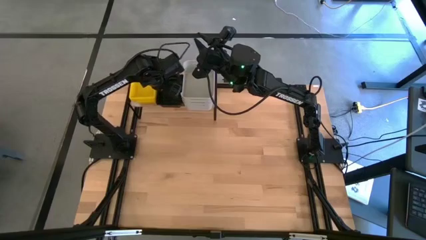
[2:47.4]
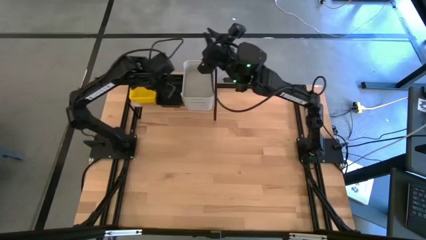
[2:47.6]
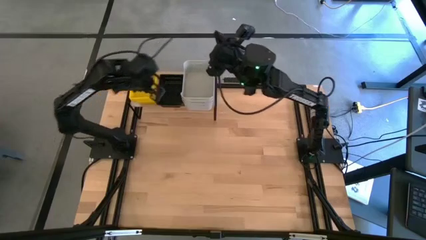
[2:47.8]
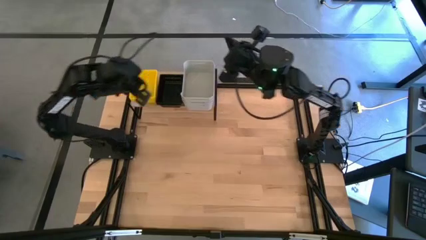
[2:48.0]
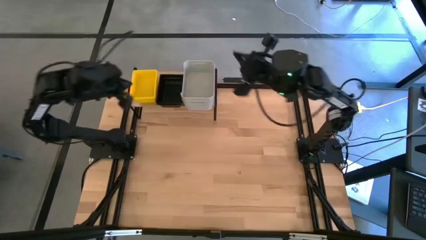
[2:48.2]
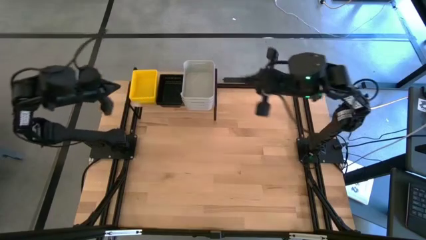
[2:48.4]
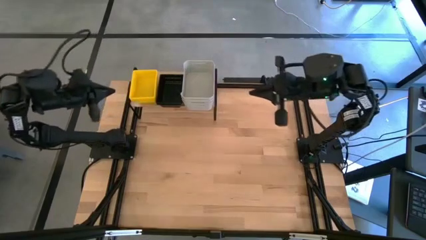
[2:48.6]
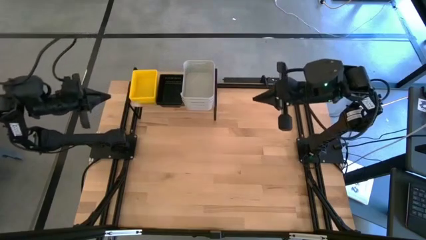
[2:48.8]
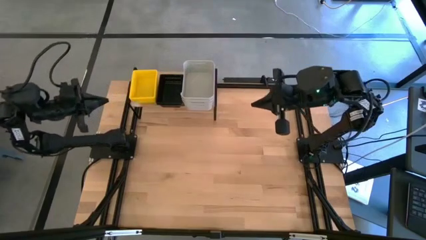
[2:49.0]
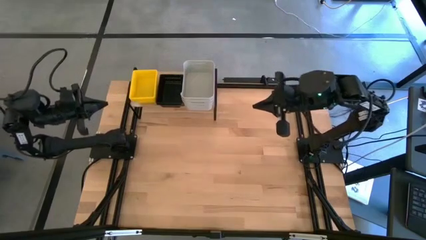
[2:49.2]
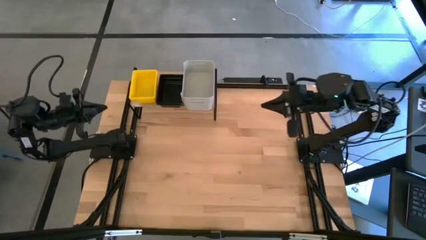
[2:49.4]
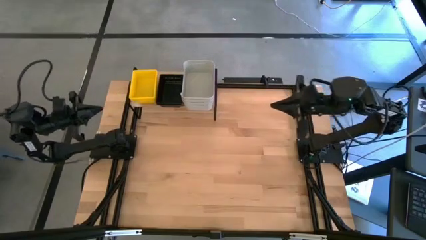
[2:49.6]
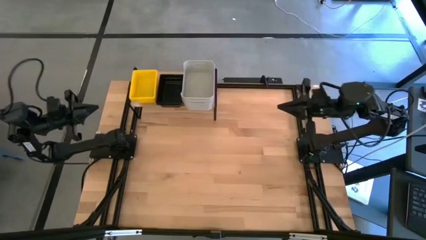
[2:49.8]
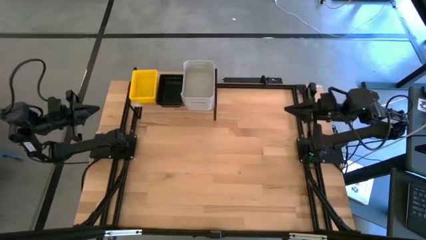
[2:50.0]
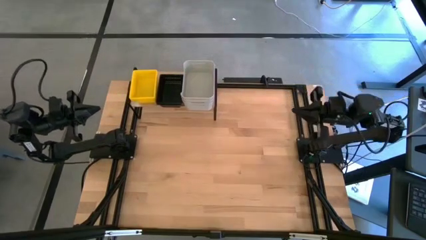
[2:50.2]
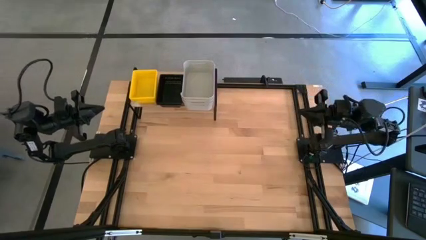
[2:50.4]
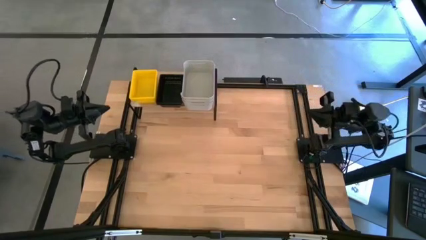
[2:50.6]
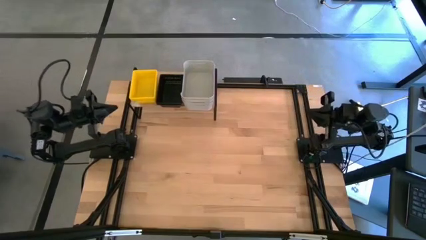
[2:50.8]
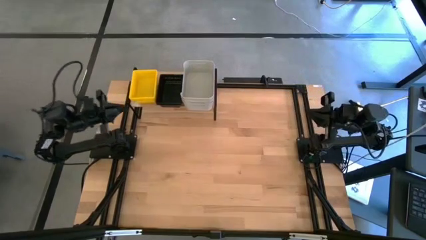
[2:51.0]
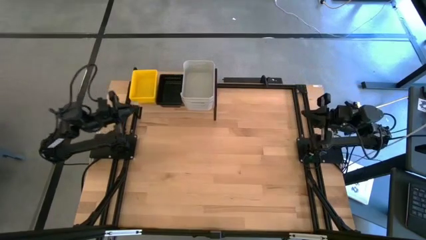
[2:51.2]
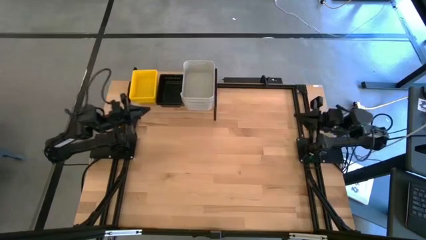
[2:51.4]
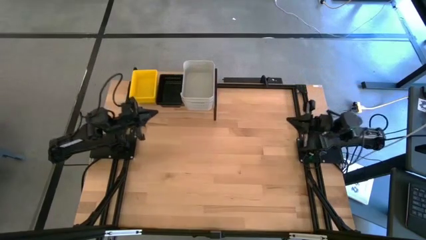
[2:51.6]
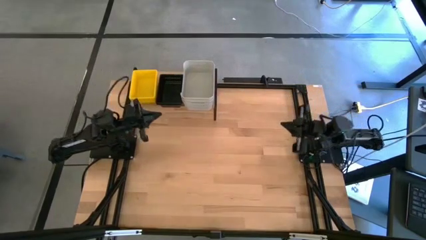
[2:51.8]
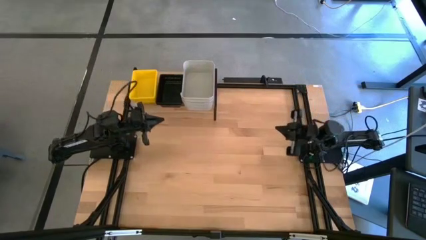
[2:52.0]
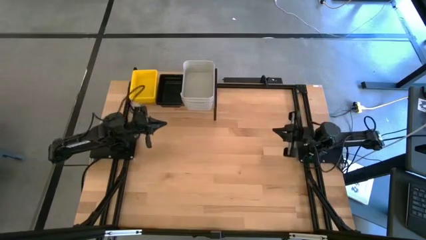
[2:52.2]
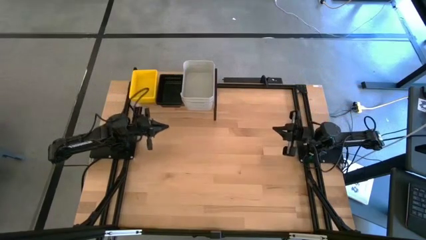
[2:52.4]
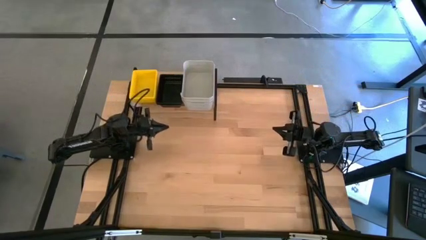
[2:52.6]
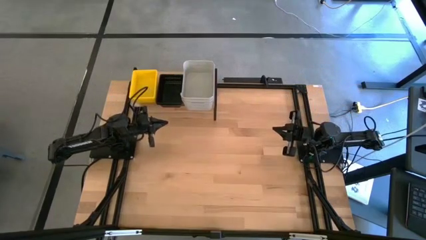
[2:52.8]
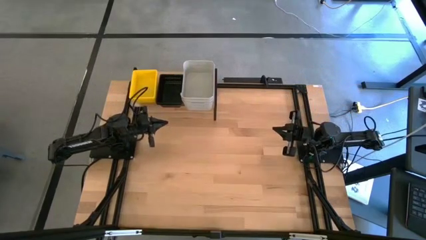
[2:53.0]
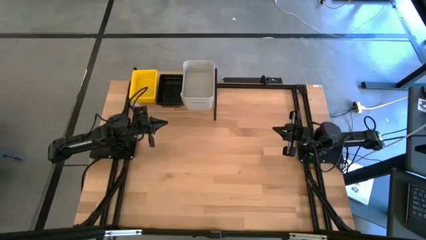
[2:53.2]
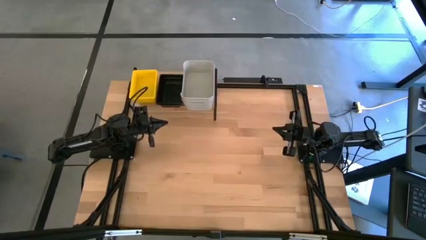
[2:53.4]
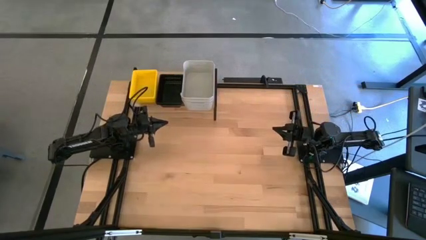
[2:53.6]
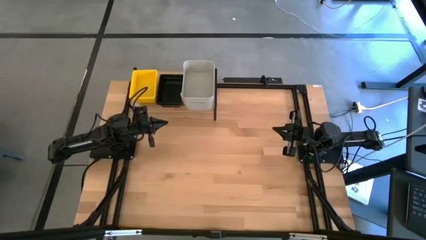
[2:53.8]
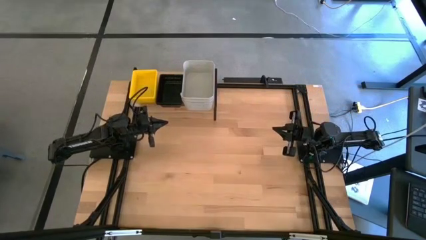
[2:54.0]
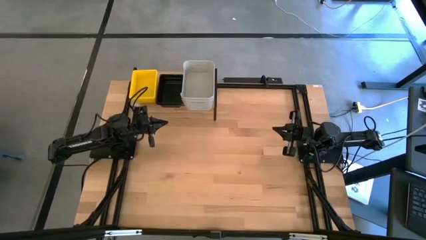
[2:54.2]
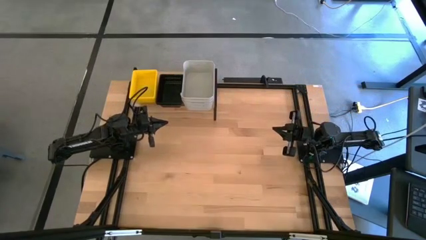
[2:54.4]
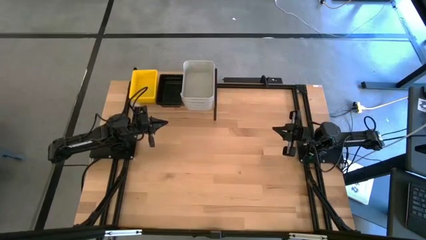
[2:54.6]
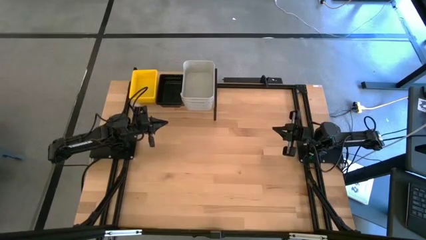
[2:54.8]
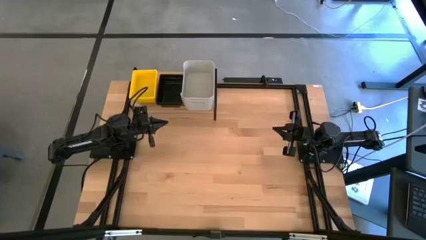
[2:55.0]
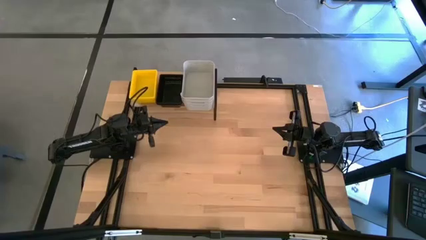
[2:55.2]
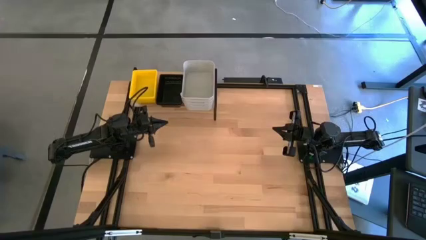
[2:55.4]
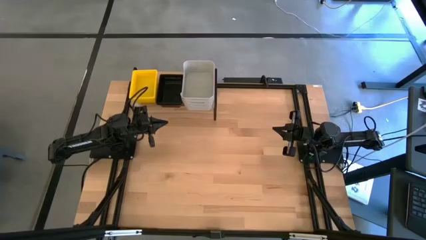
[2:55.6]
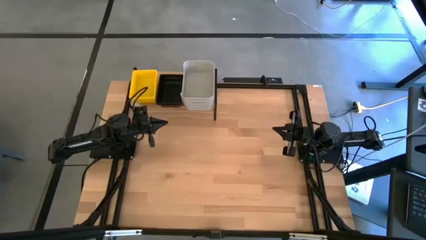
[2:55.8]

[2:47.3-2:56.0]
Task: Stack baskets on shelf by color
Return to Home Position
